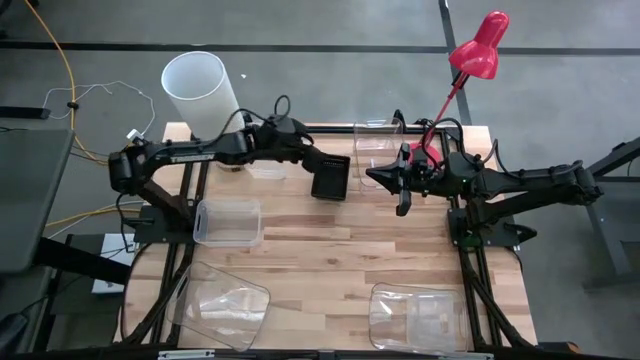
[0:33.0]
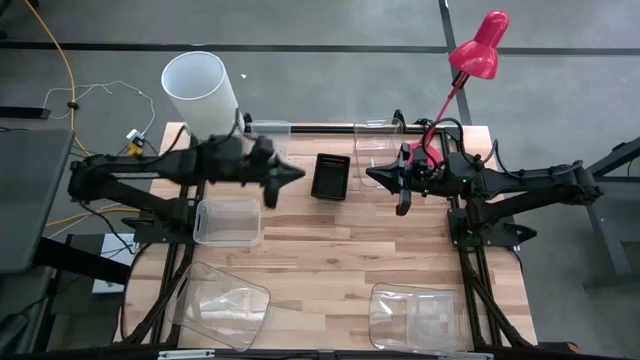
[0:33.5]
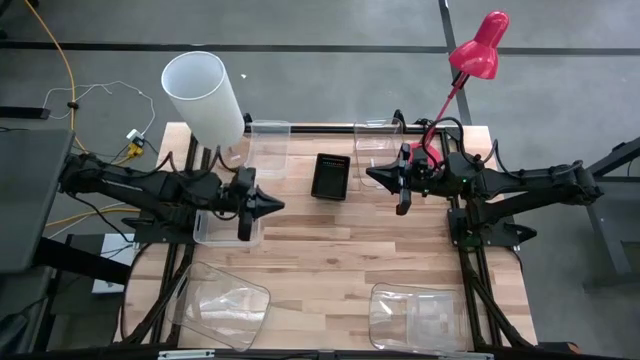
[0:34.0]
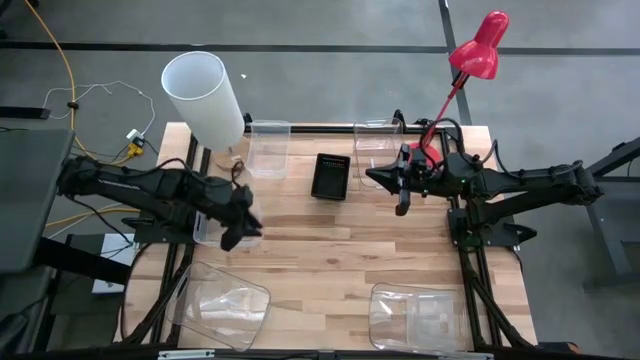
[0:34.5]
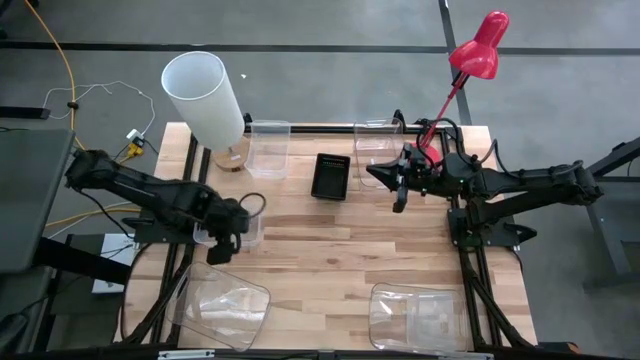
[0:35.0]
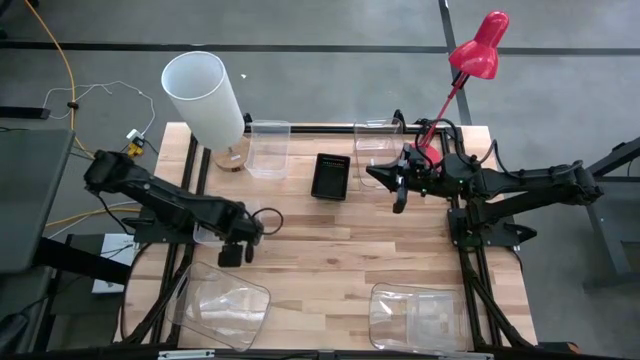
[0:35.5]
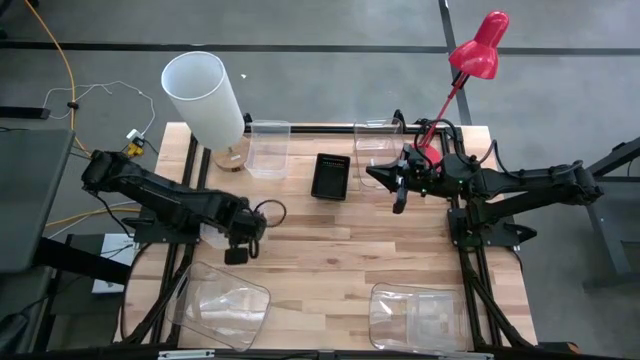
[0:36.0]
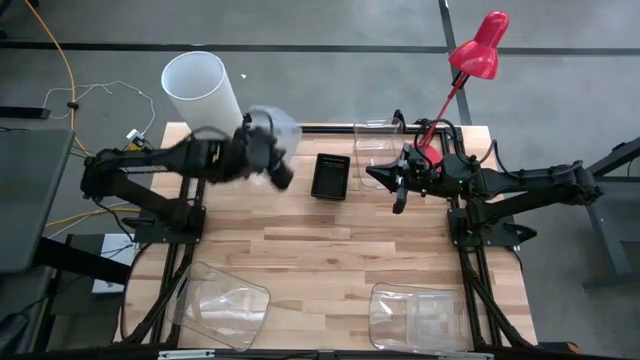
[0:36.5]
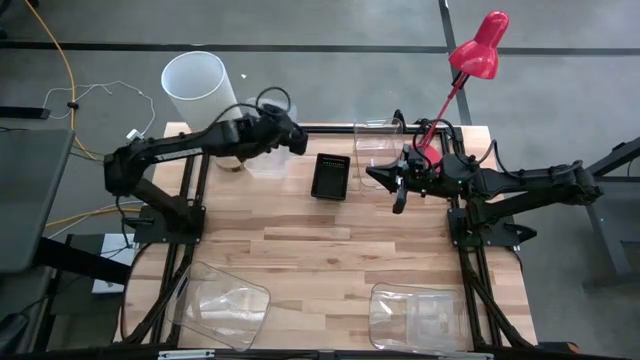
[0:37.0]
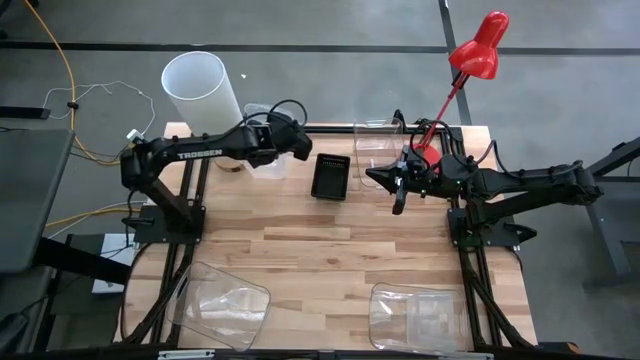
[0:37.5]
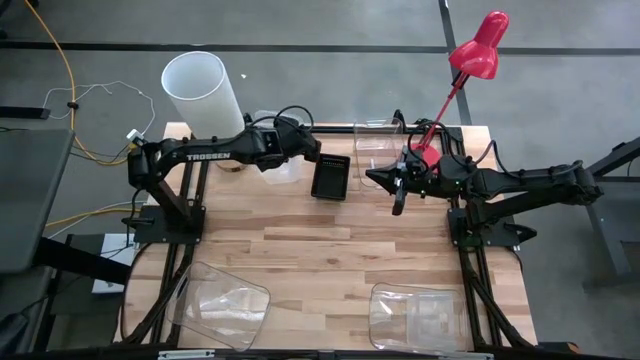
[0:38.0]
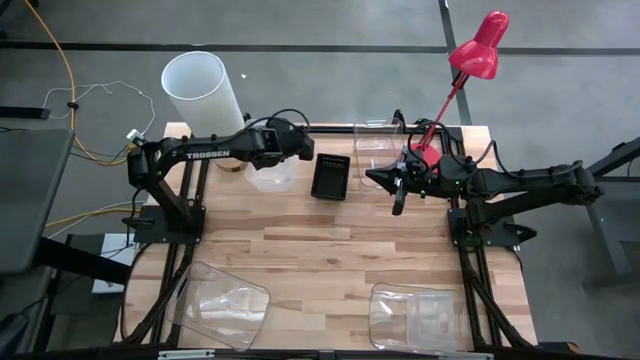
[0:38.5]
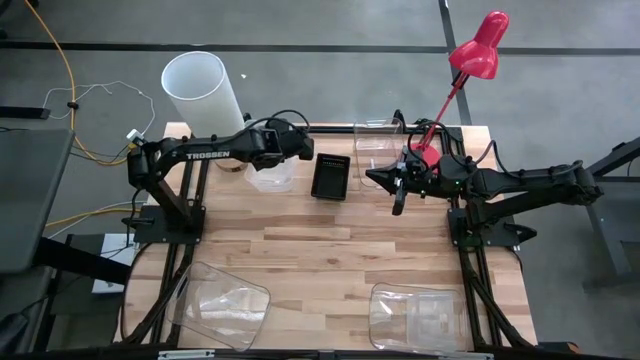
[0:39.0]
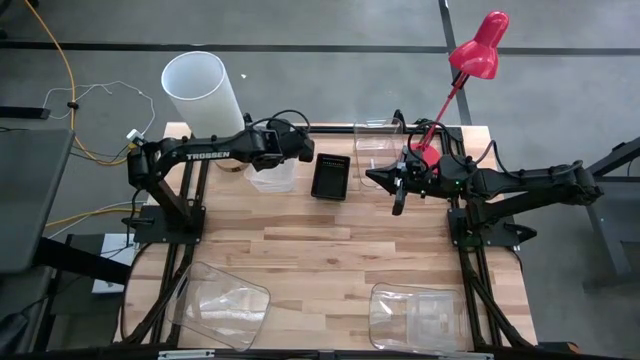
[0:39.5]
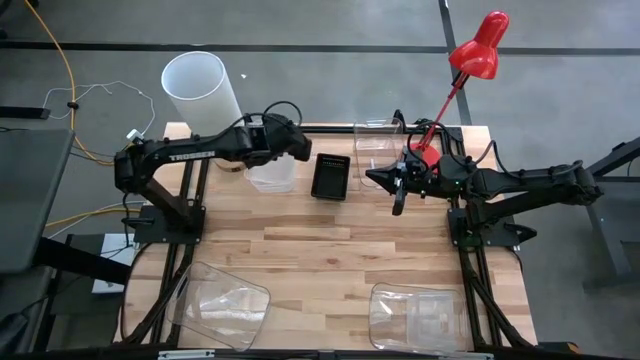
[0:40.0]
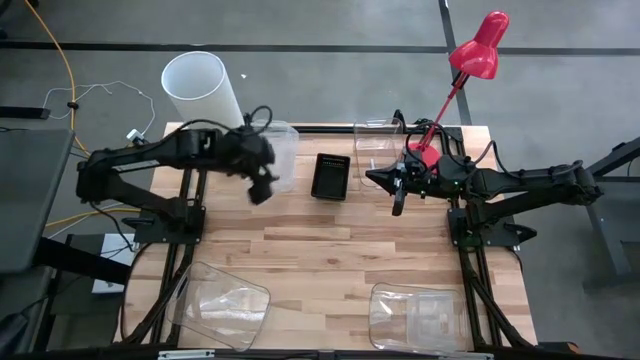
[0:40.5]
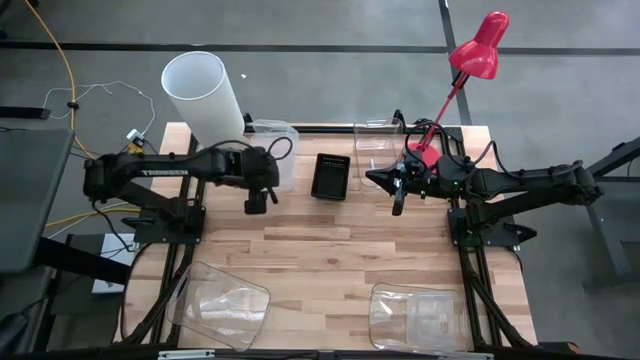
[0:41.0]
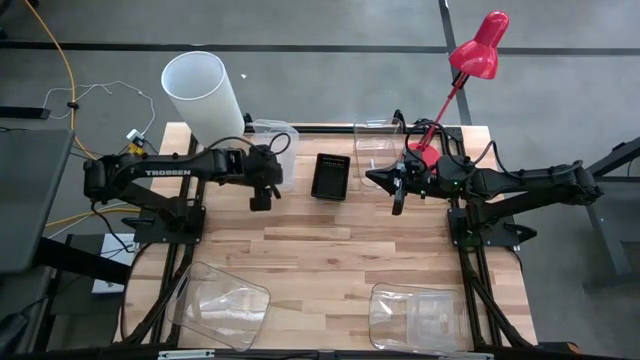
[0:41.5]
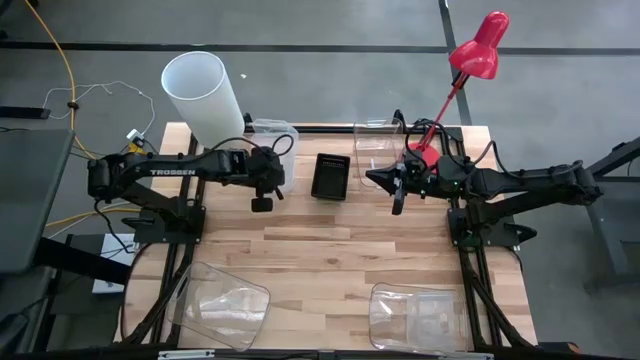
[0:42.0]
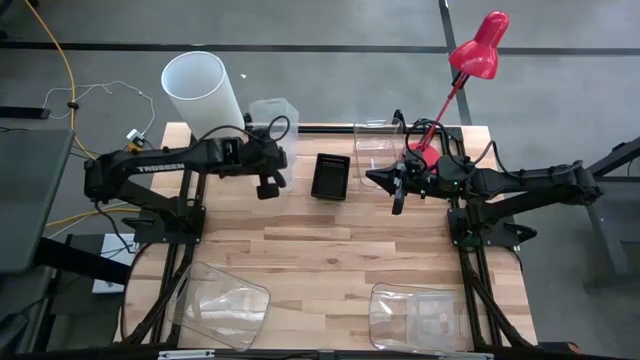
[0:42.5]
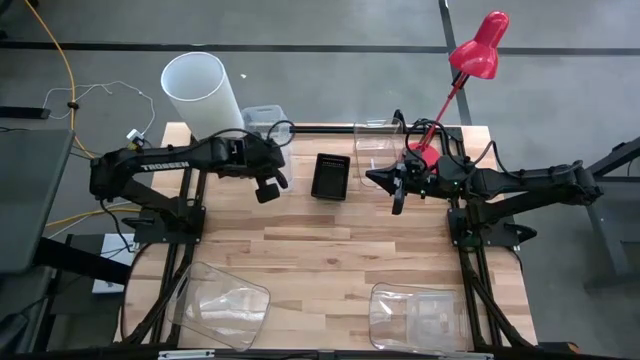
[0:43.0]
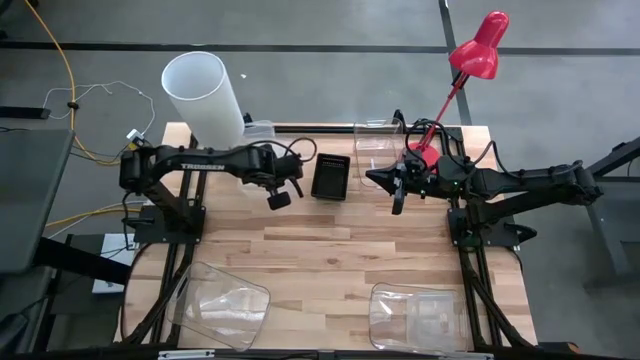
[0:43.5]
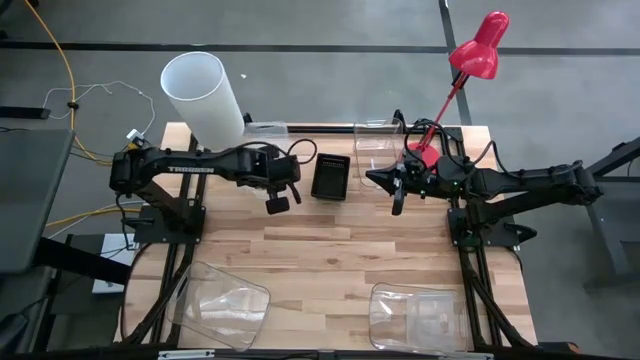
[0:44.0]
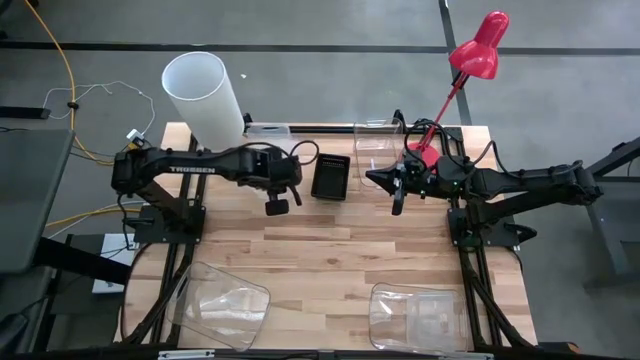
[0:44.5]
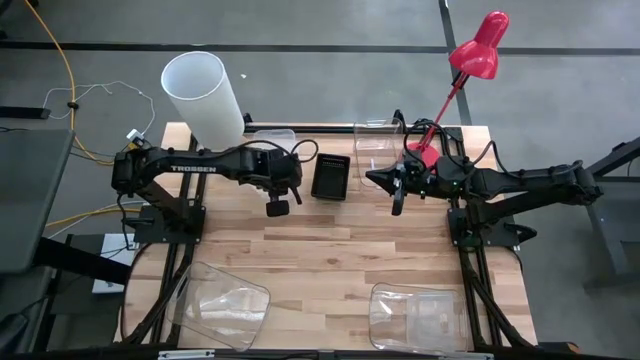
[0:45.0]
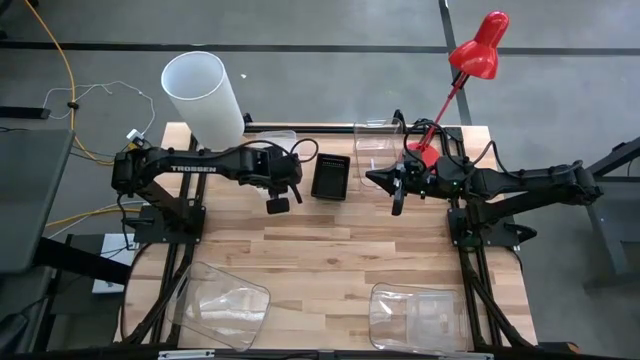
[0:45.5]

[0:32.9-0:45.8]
Stack the middle white bin on the top white bin
